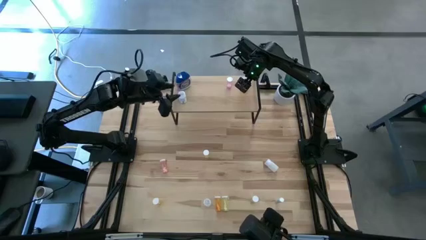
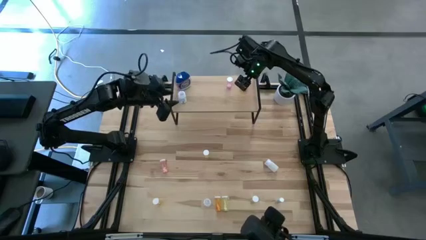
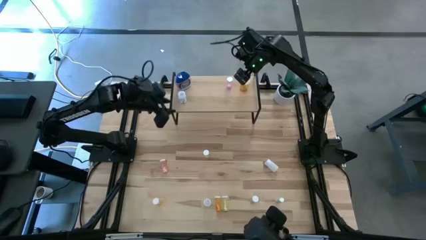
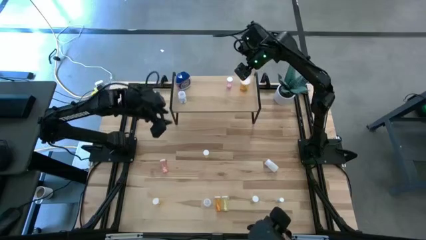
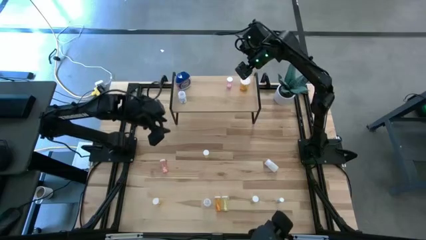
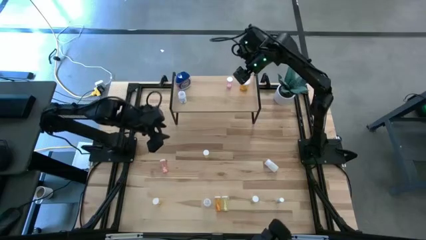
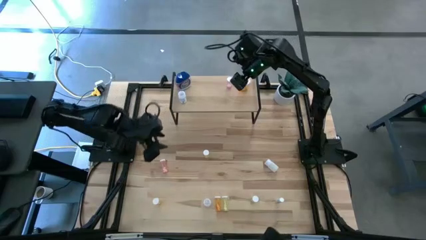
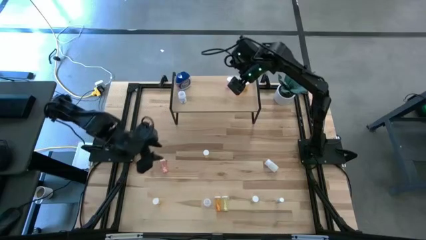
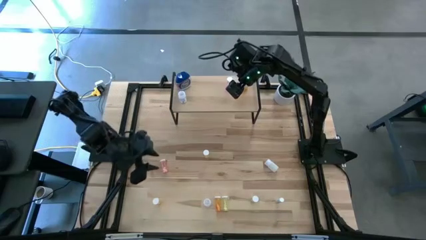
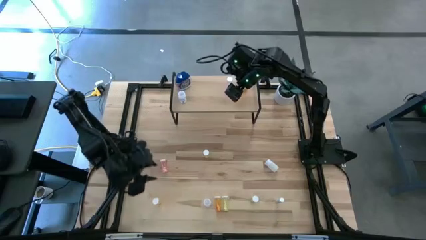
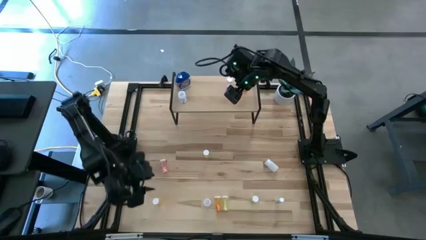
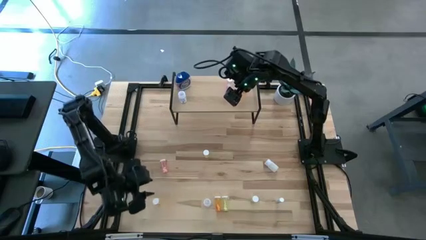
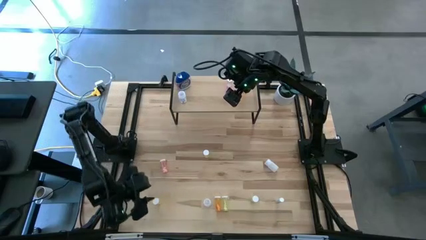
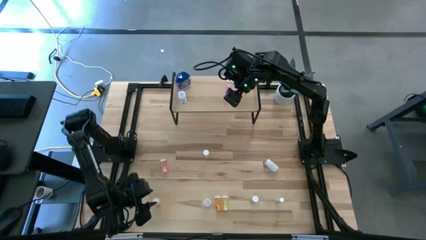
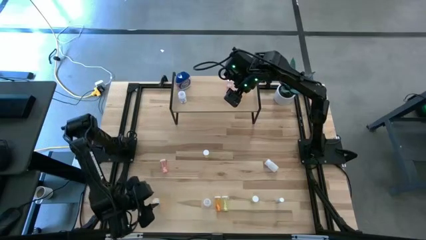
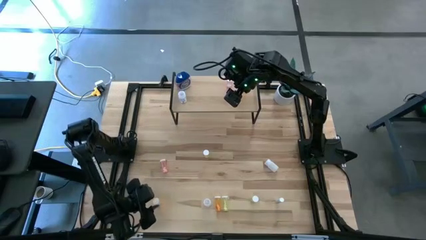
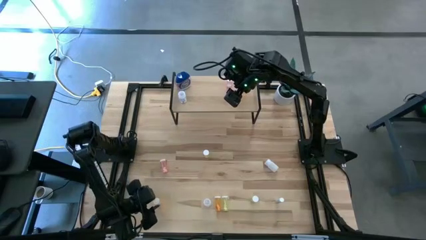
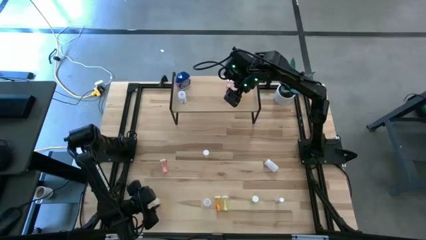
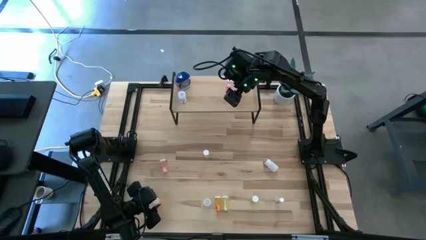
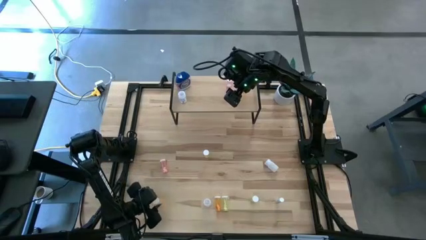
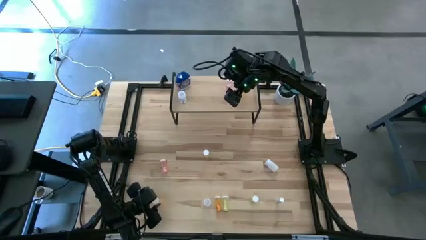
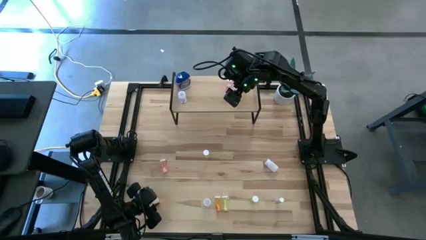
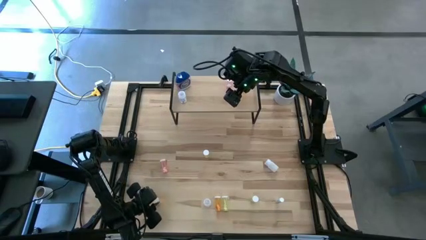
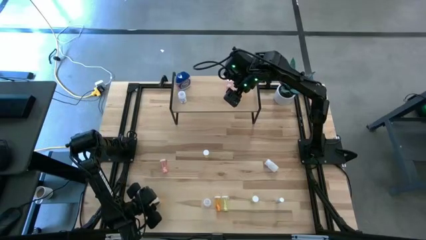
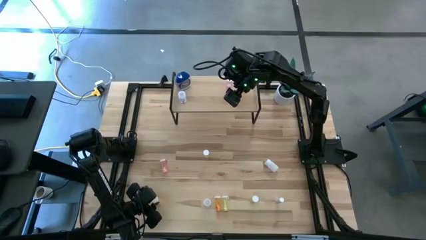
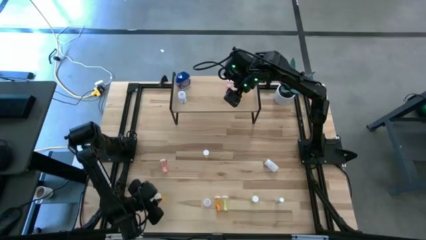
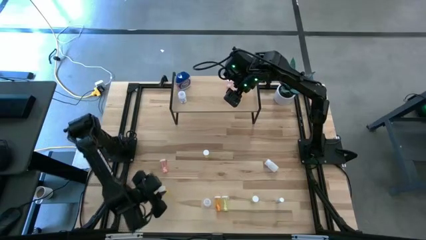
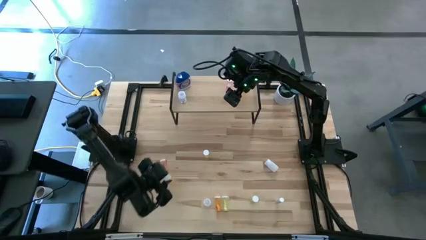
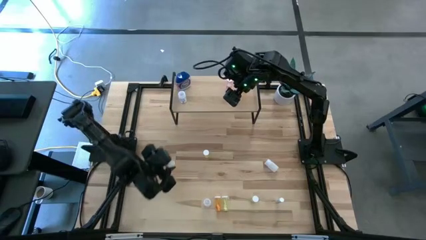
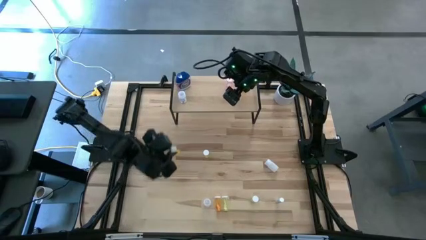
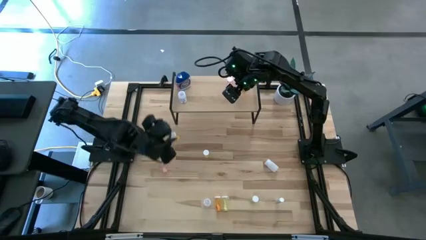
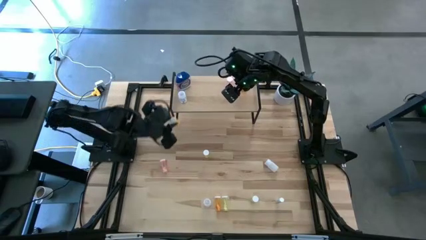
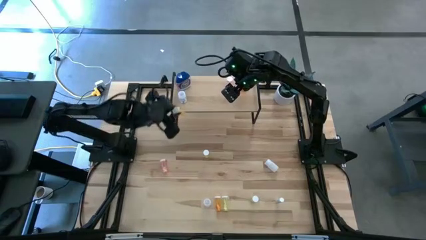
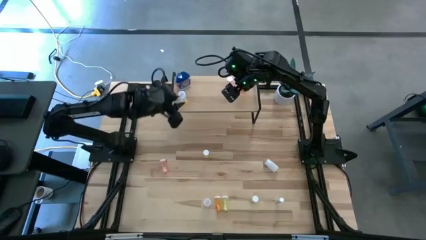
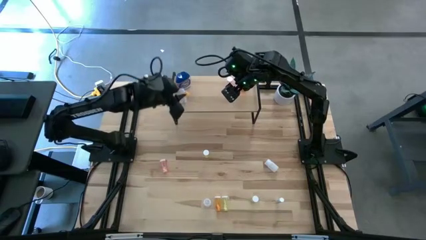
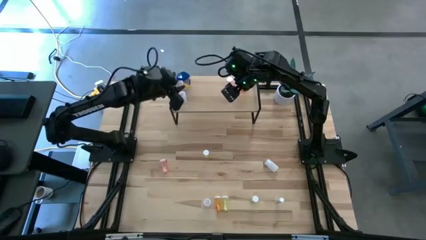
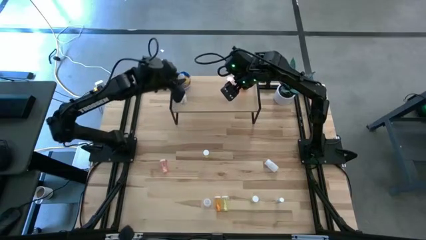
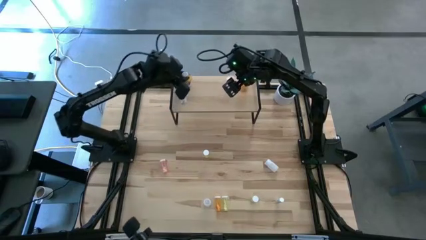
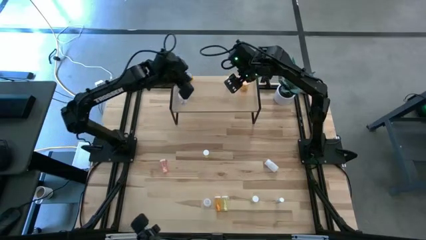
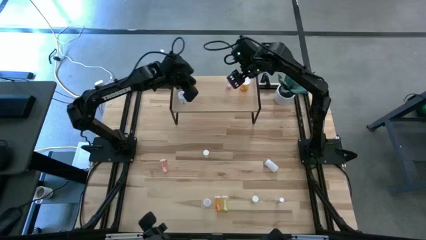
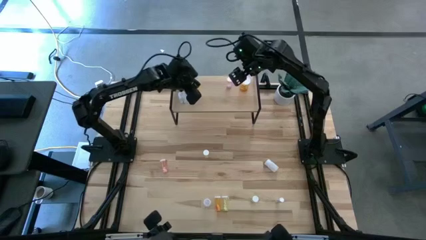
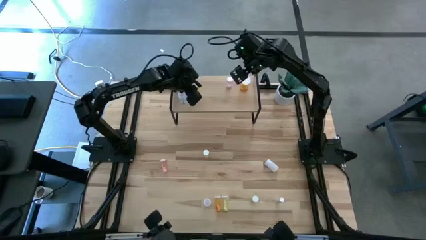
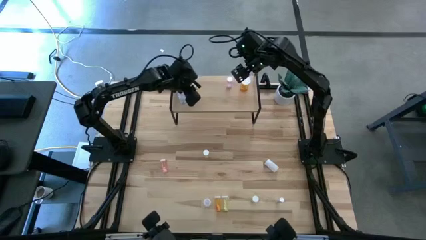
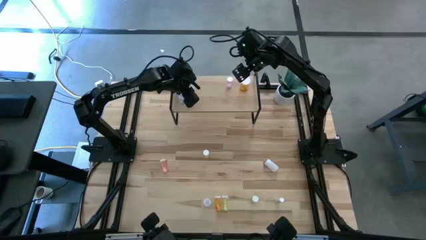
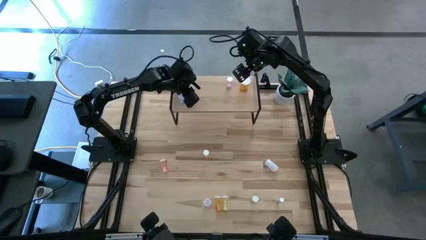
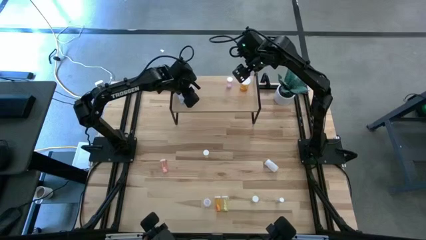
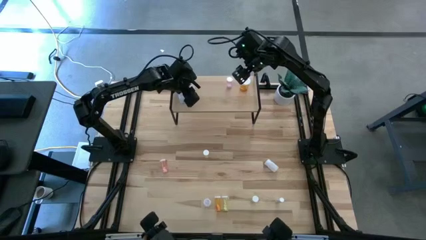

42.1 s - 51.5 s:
Task: Pick and place medicine bottles onto shelf by color
Put the left small orange pill bottle on the shelf

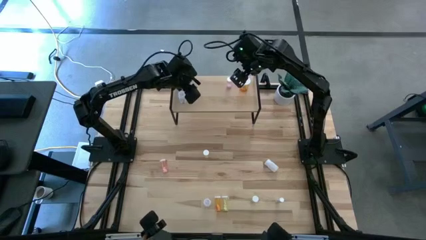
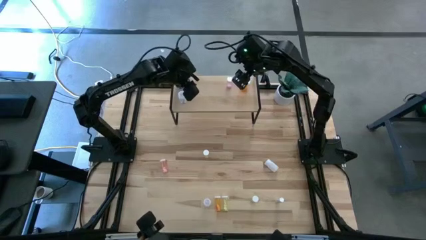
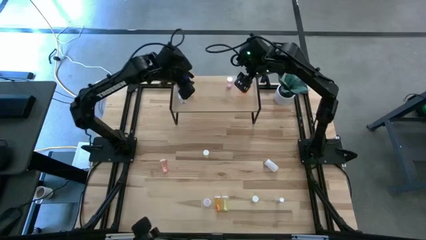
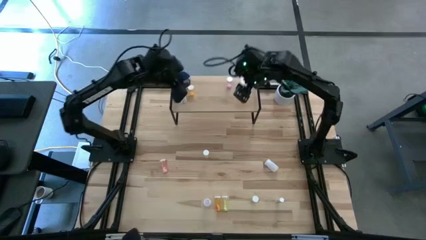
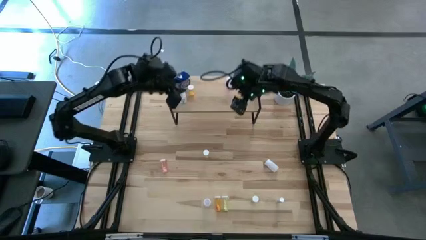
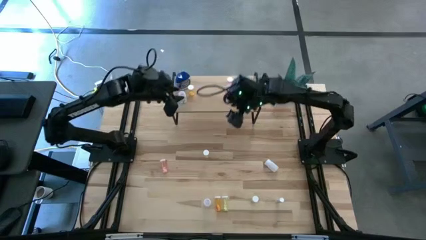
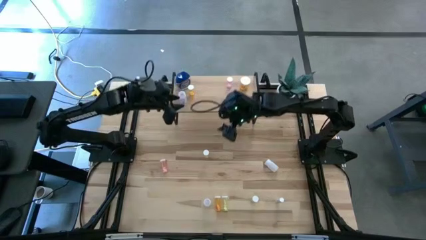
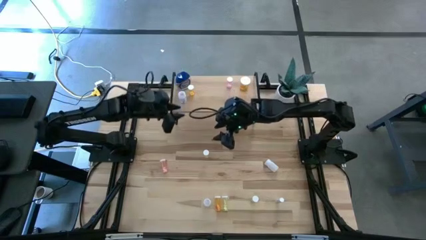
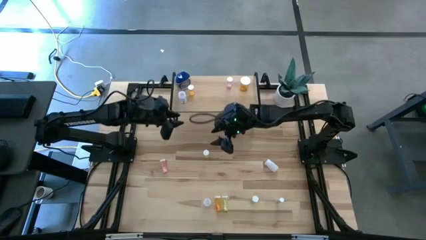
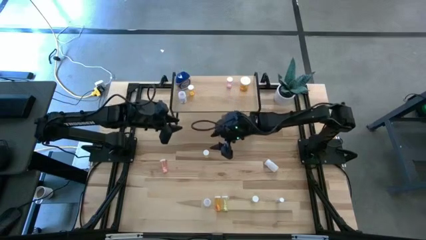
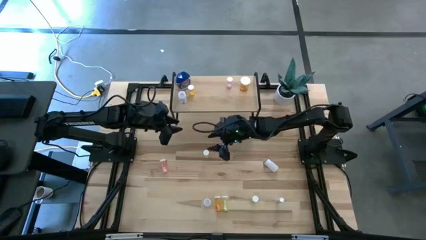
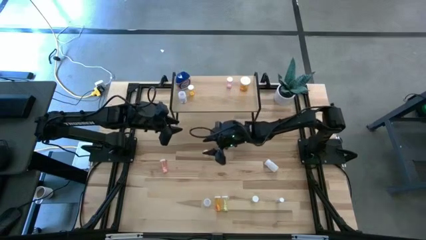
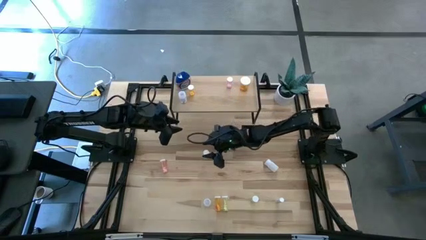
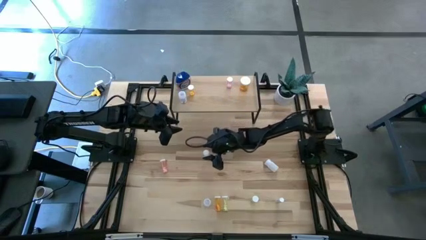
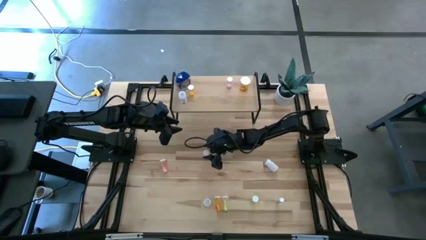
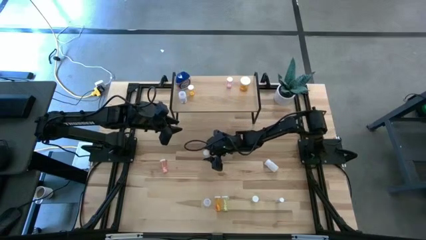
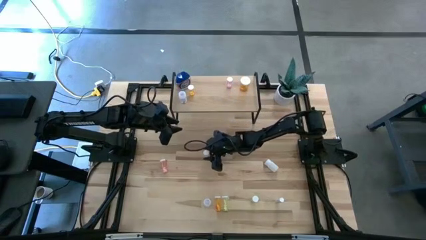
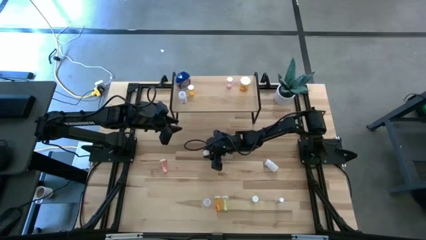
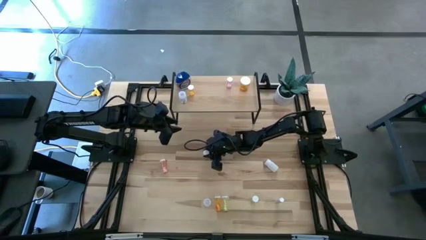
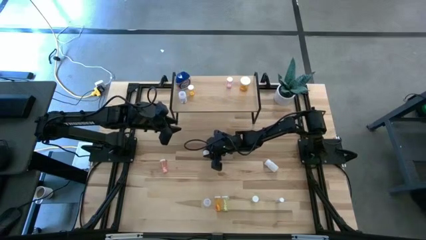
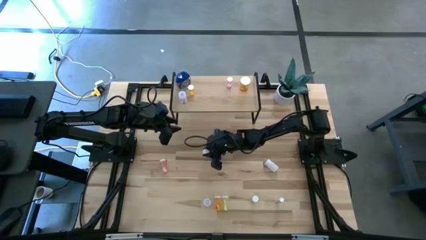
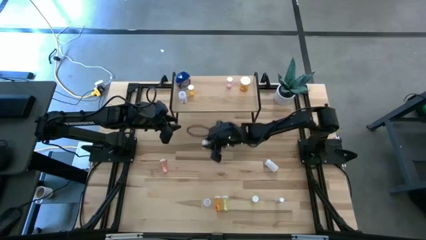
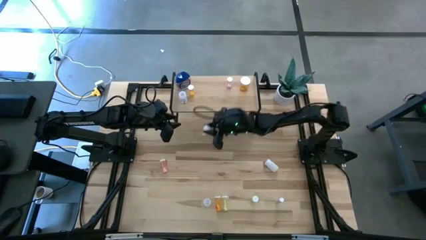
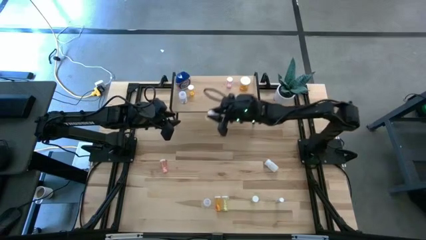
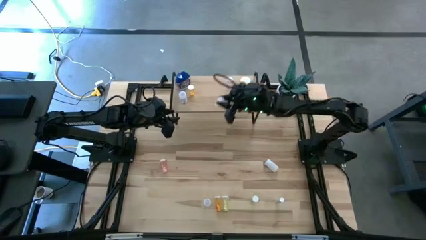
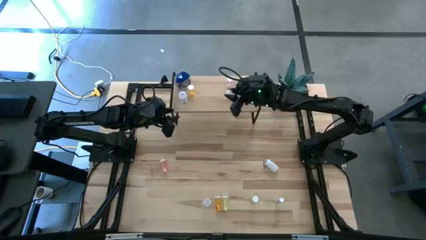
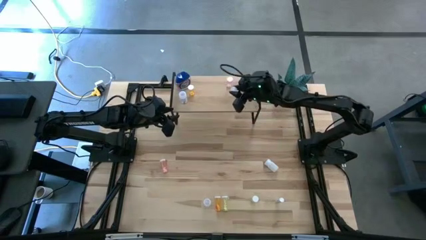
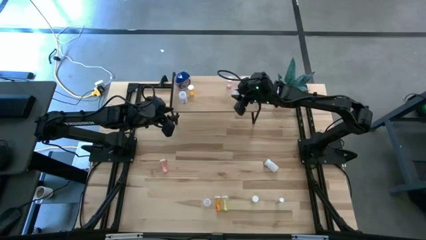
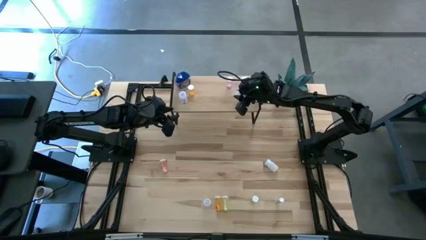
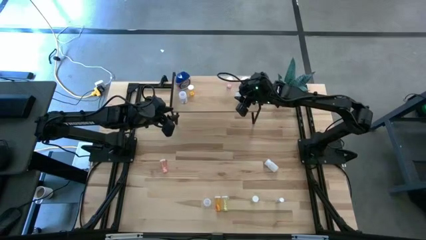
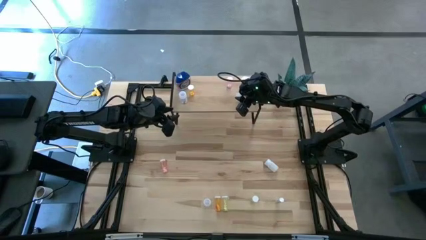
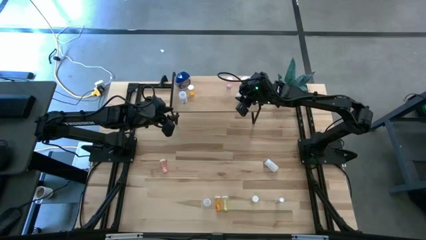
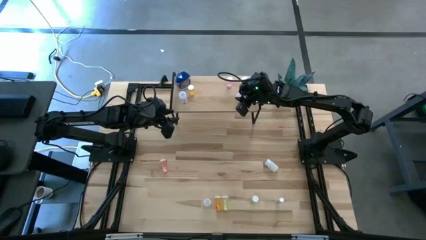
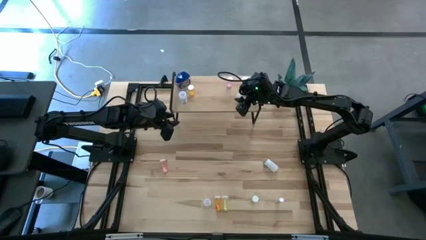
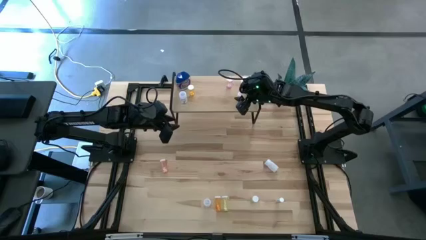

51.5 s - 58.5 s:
Put the top yellow pill bottle on the shelf
